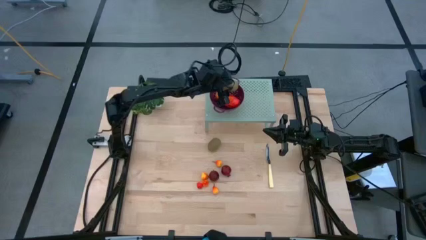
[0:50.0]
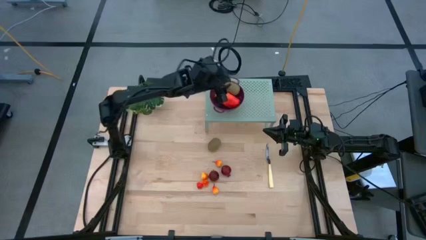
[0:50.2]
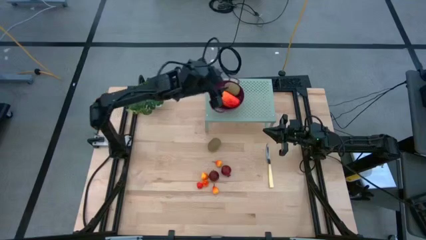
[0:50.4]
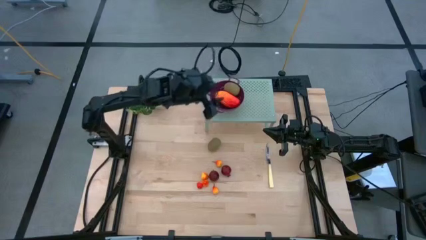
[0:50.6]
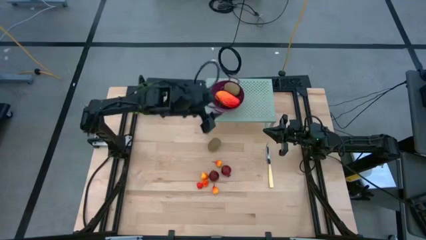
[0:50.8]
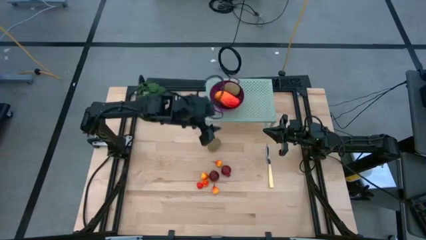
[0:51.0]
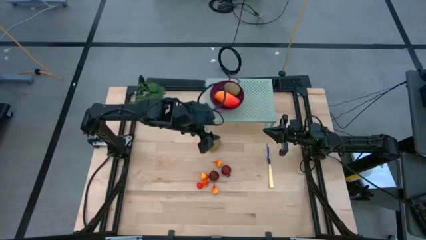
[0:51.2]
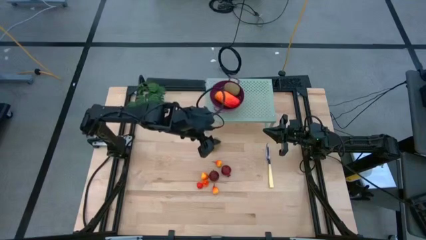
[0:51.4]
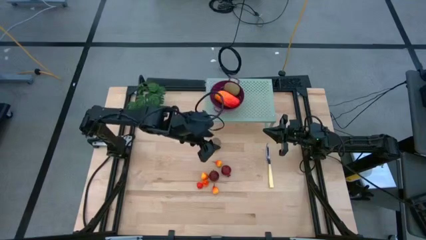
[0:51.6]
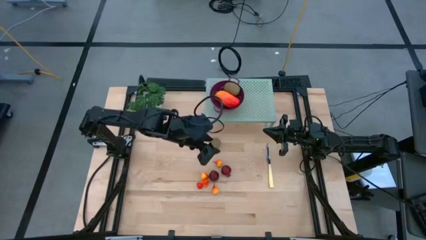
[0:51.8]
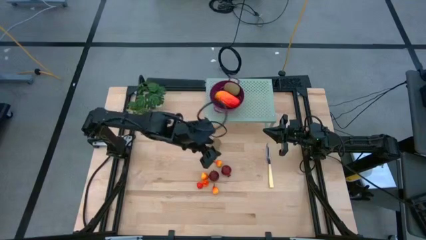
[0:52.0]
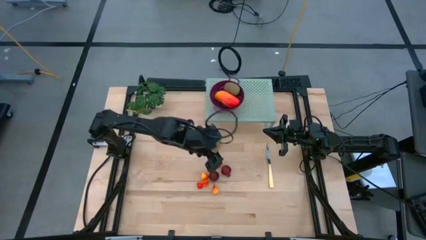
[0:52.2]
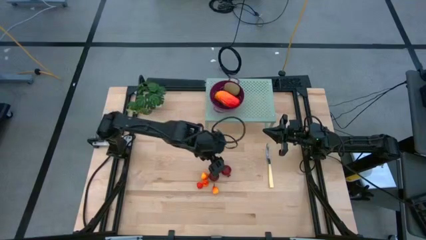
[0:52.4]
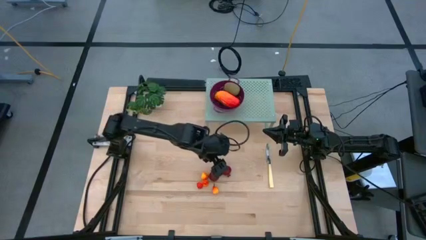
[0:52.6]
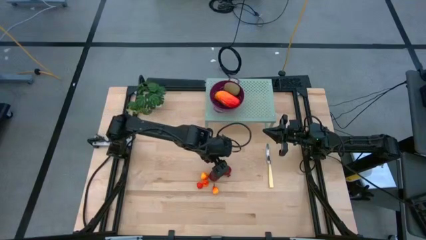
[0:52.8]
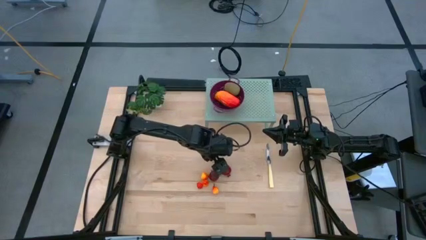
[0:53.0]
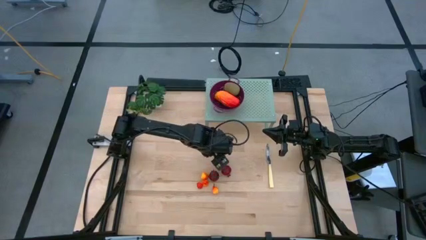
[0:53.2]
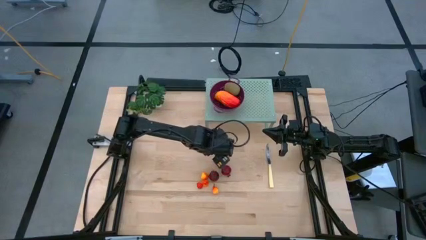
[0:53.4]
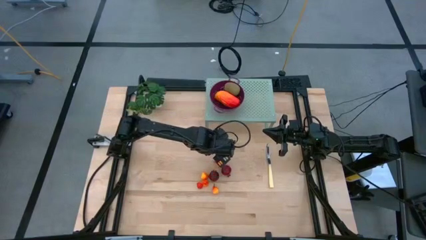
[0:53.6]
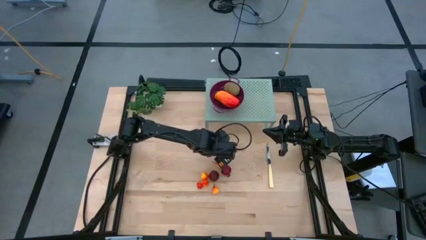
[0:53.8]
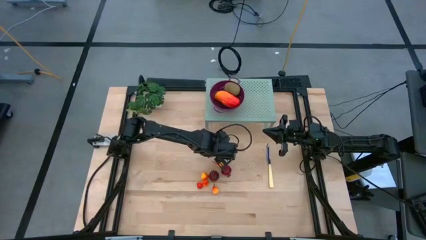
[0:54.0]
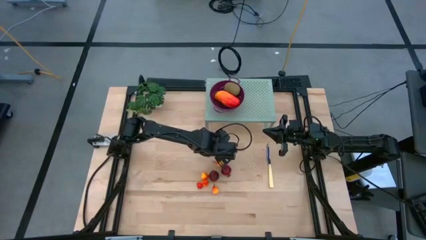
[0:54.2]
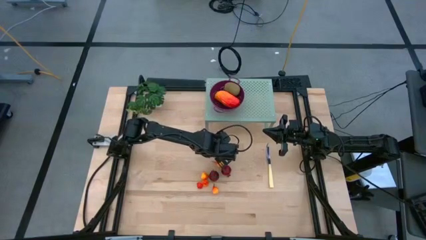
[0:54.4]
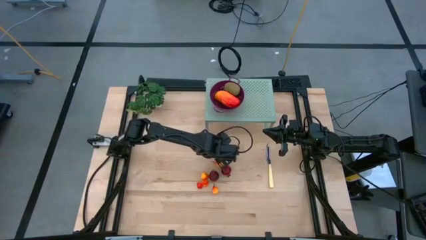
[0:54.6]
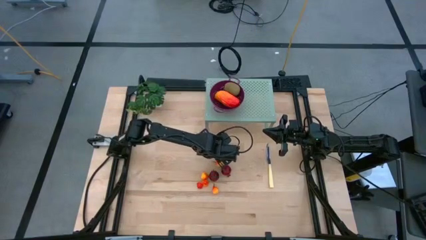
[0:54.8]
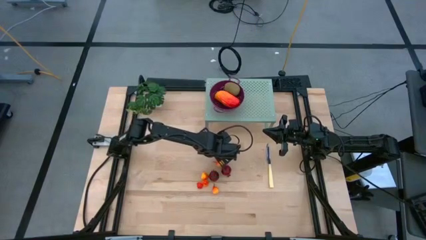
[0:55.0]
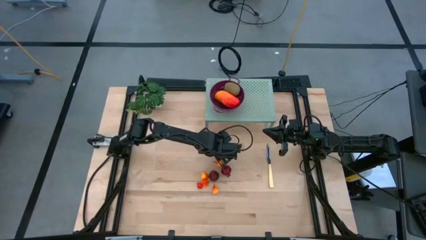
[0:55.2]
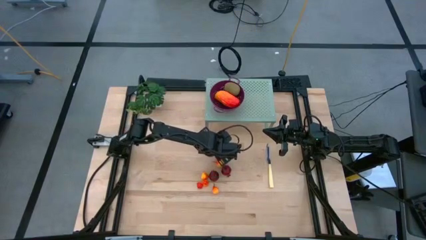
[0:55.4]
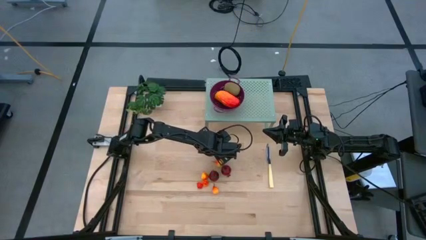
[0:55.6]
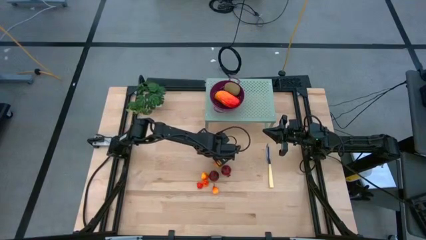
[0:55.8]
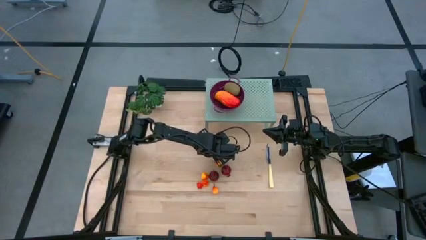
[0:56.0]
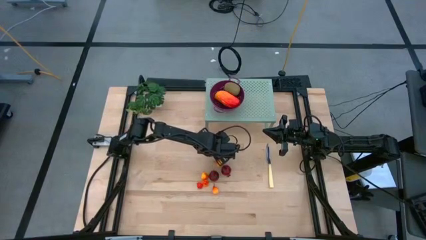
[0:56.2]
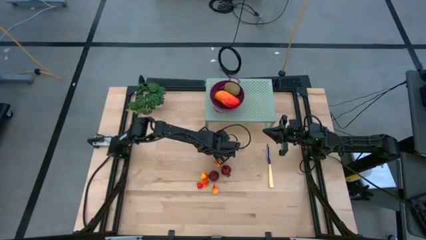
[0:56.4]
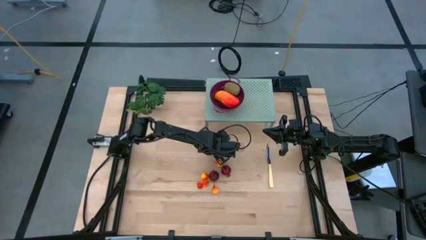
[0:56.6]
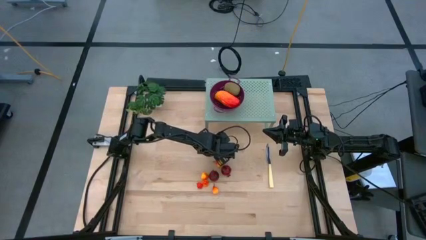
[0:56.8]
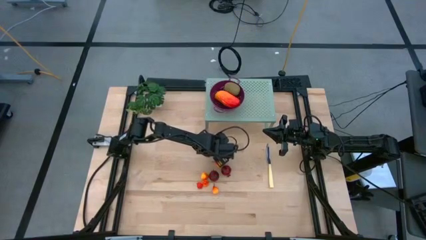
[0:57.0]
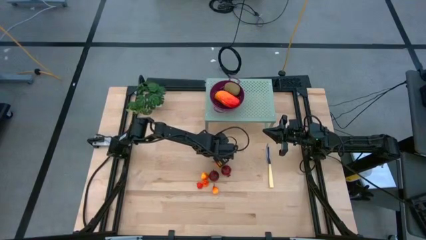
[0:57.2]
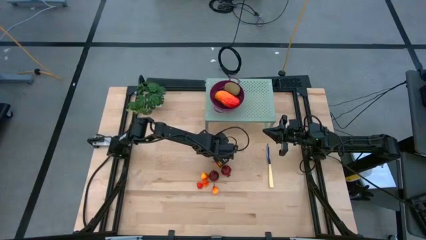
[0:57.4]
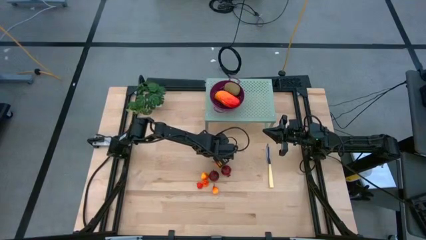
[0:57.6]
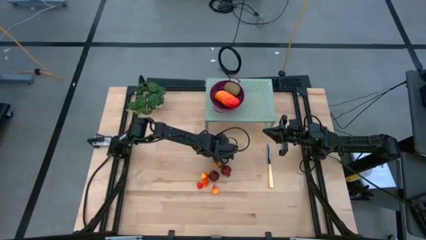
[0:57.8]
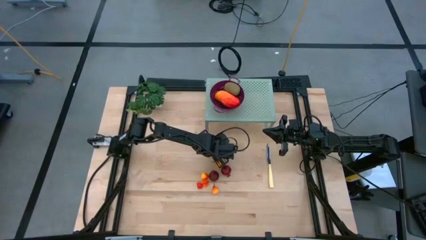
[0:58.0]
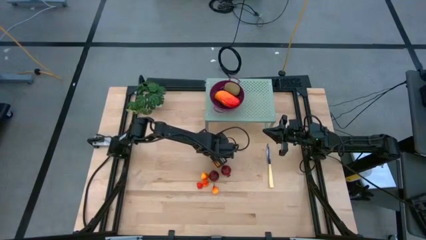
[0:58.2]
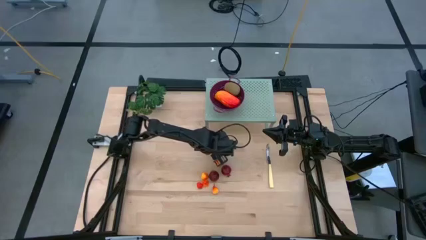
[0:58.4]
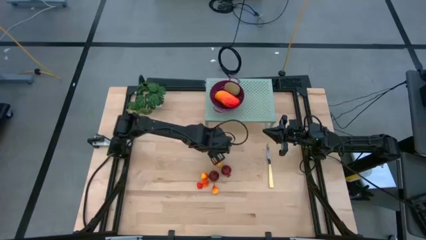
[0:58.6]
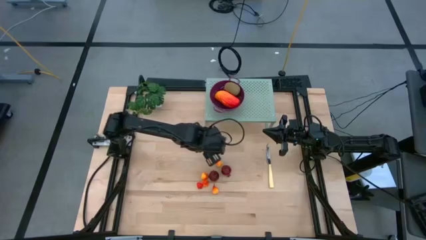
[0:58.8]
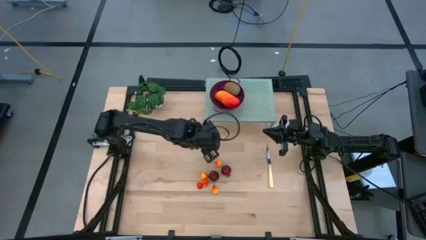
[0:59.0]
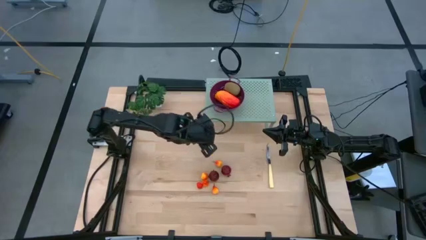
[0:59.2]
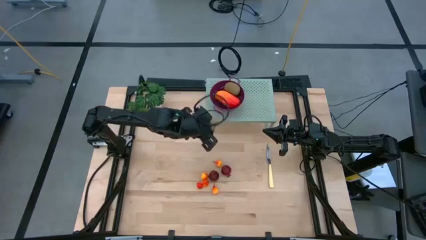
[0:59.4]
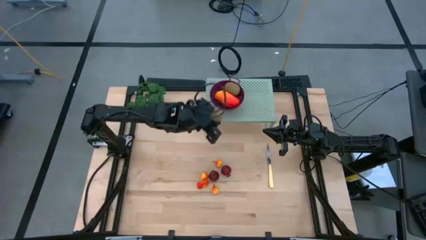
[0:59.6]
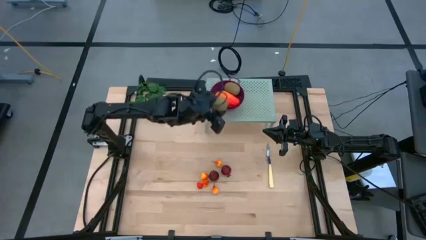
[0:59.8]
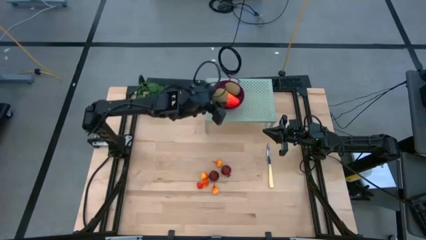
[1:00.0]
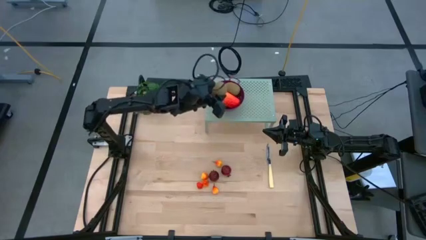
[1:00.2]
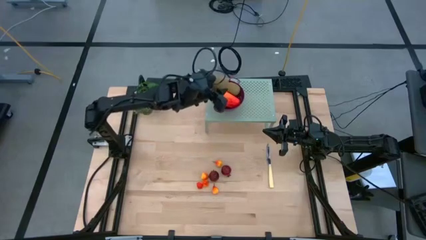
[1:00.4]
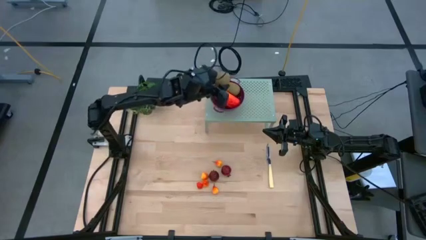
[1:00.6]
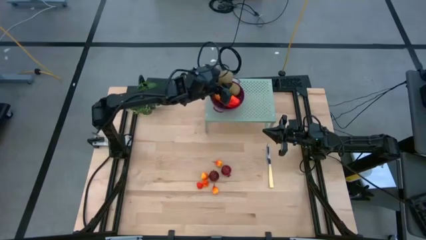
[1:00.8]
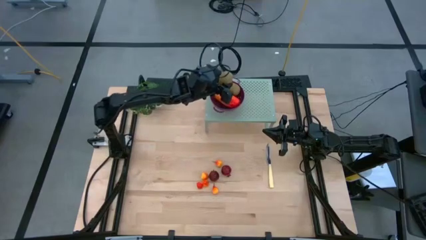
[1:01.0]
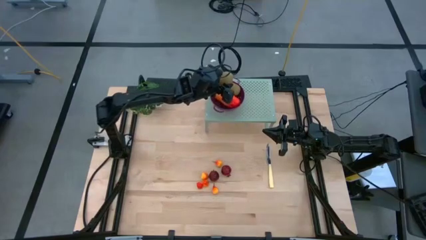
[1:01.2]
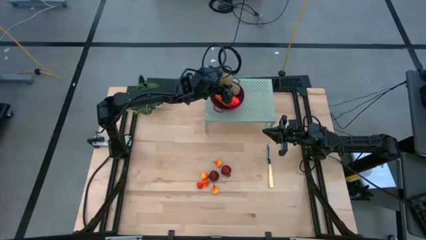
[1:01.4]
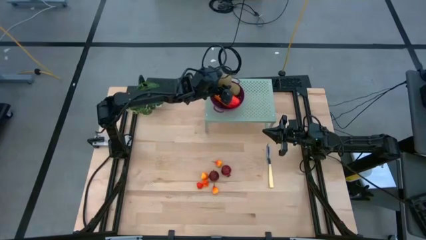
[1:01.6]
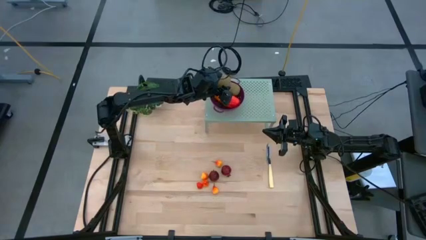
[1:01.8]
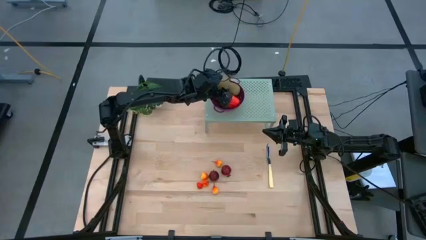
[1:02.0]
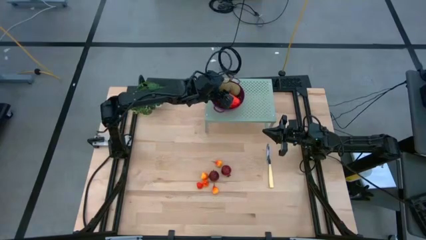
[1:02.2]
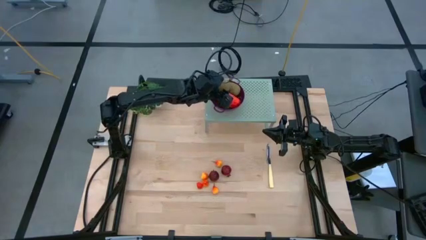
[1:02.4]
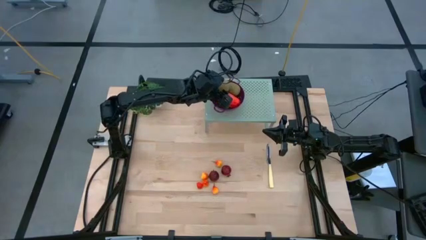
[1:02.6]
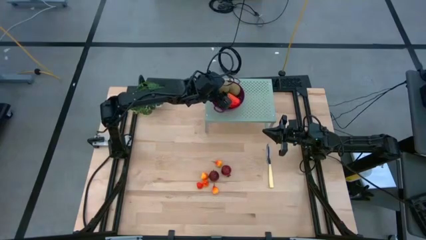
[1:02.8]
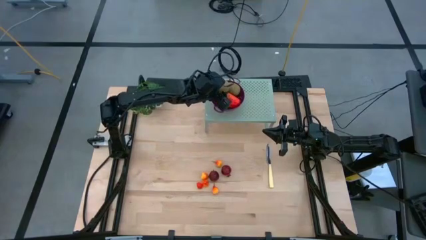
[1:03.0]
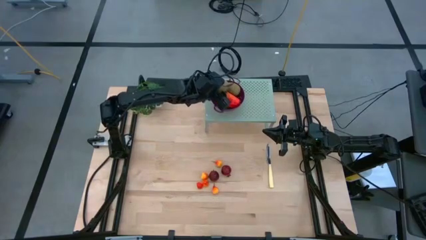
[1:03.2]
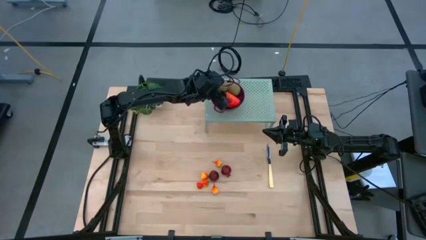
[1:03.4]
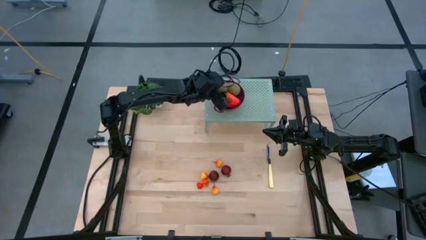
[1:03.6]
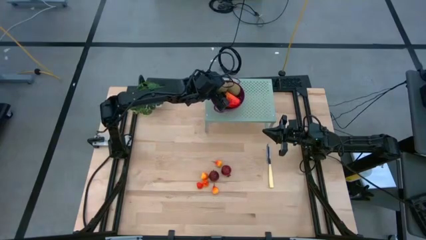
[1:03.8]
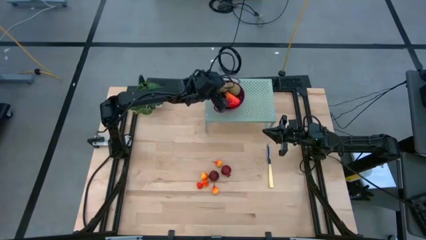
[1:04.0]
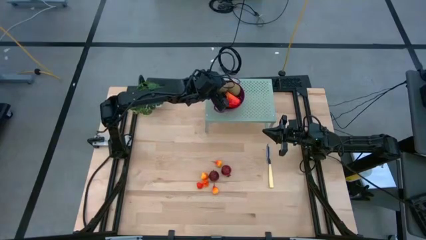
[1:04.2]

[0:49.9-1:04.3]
Task: Pick & Place Fruit
Put the kiwi into the dark red colander on the shelf
